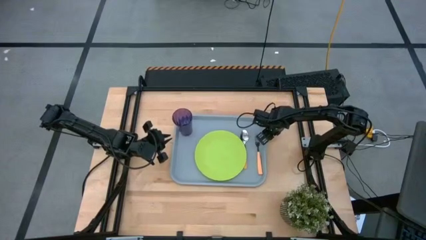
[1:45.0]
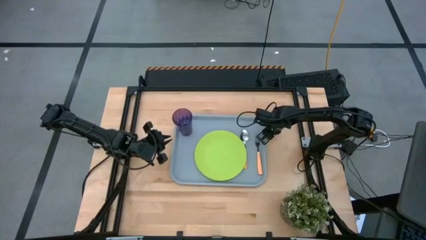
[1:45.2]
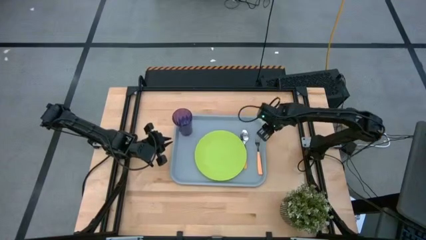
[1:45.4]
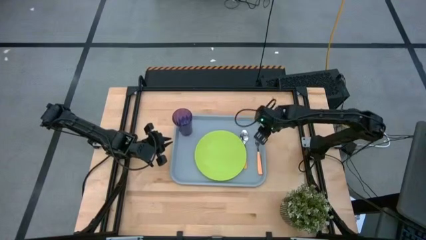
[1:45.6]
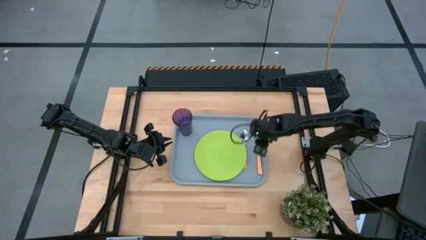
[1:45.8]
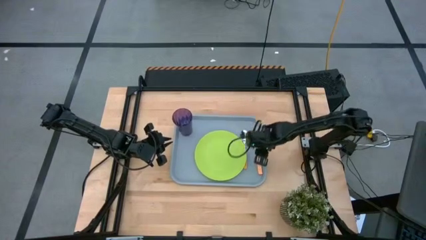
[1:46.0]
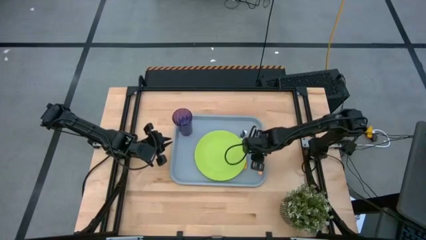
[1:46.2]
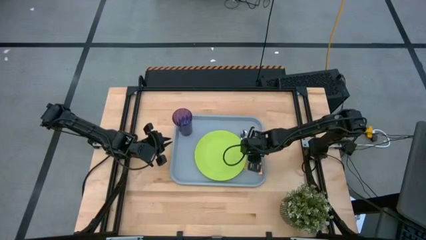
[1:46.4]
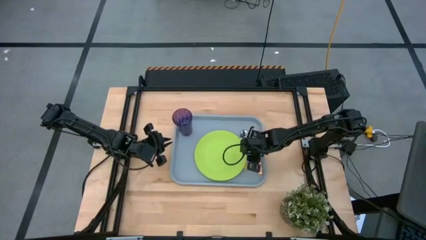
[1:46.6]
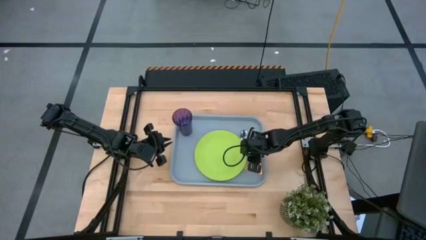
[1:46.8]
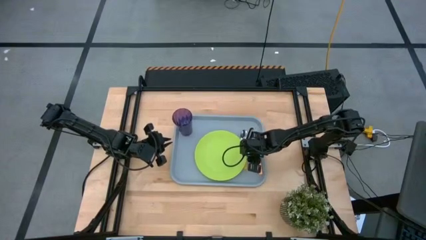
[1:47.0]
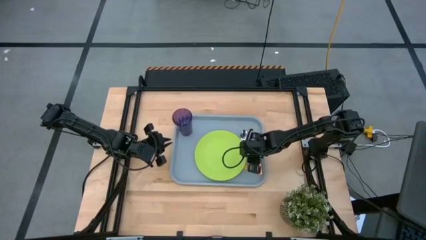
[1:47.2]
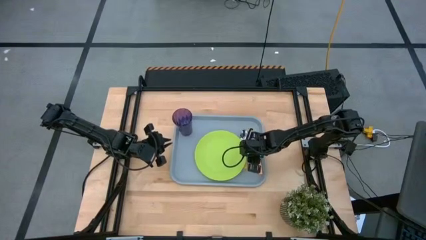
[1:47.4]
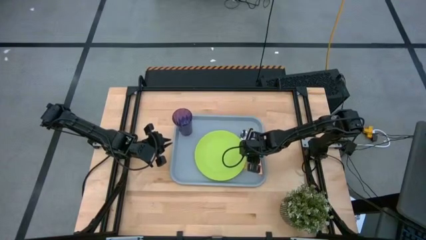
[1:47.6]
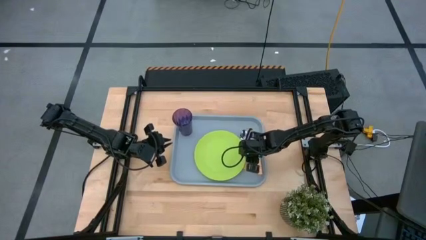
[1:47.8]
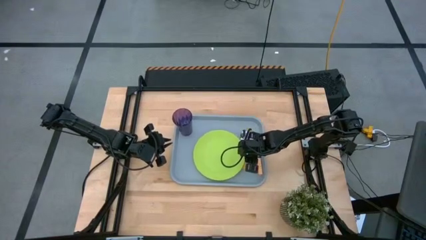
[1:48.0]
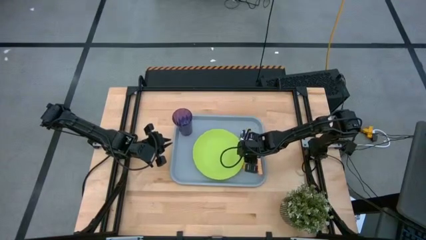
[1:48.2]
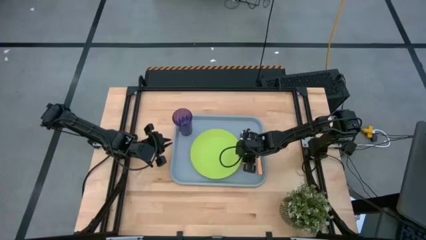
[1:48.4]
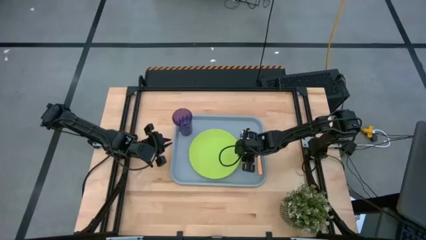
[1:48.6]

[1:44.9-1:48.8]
Task: Pick and place plate/cup/fork/spoon on tray
Adjust the green plate on the gray serving tray

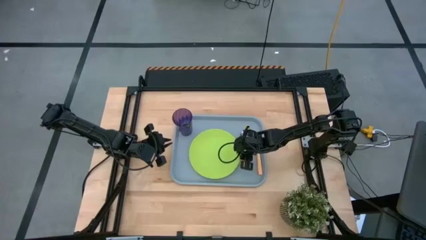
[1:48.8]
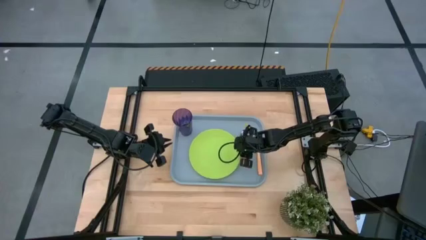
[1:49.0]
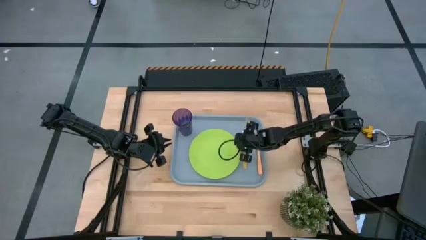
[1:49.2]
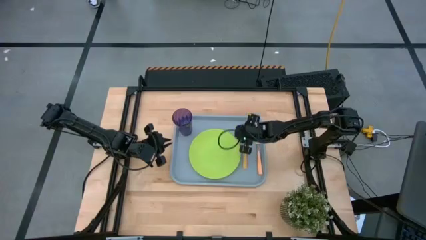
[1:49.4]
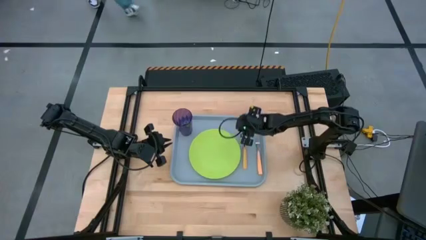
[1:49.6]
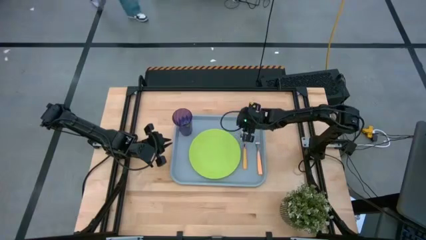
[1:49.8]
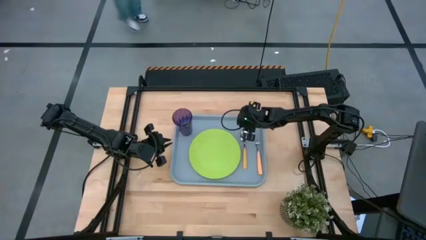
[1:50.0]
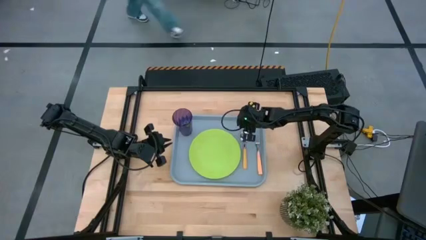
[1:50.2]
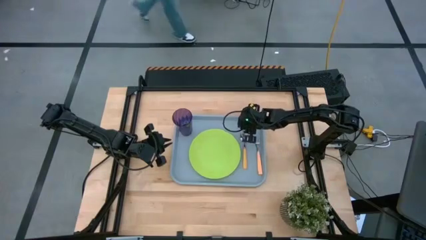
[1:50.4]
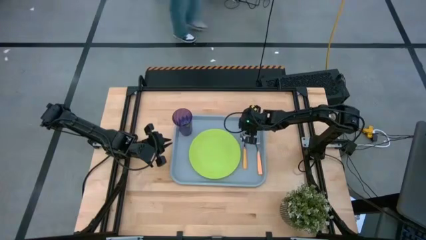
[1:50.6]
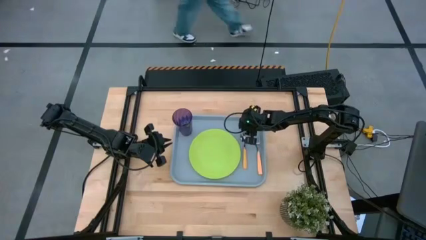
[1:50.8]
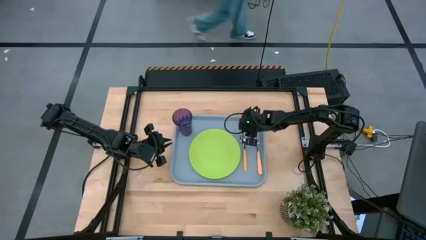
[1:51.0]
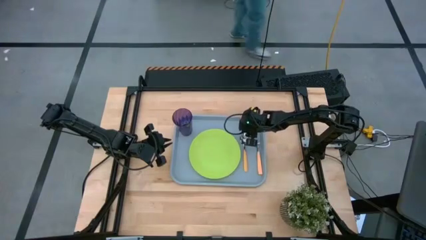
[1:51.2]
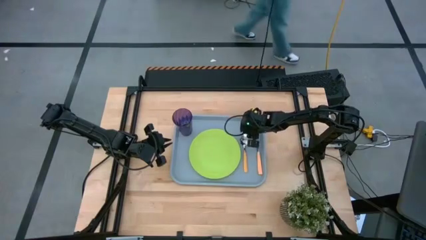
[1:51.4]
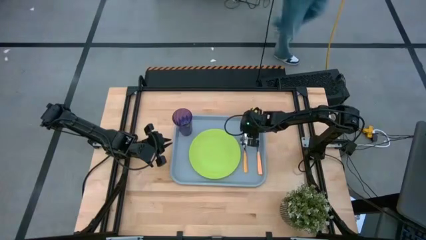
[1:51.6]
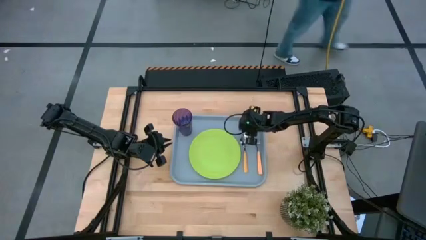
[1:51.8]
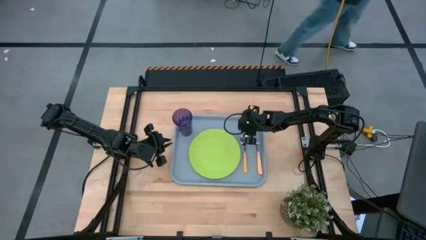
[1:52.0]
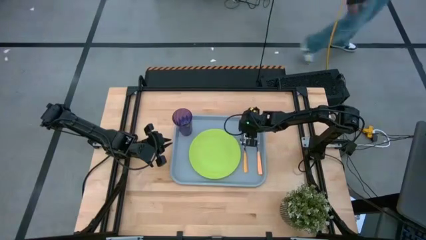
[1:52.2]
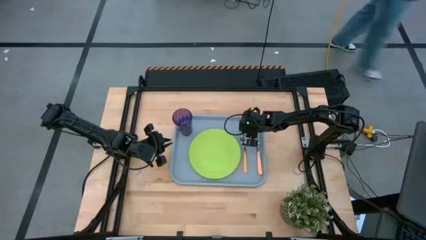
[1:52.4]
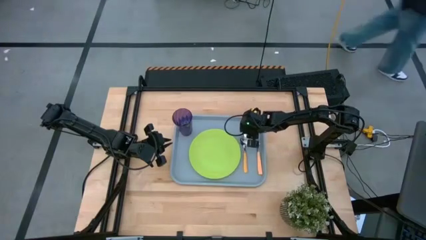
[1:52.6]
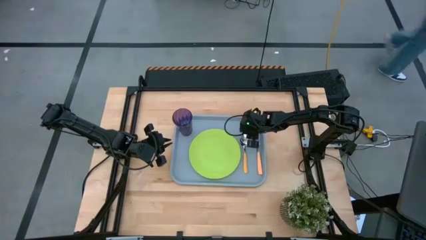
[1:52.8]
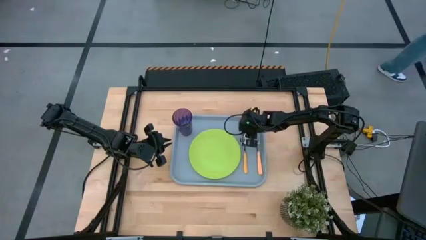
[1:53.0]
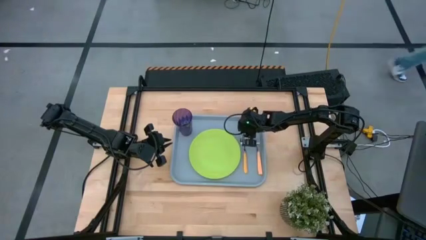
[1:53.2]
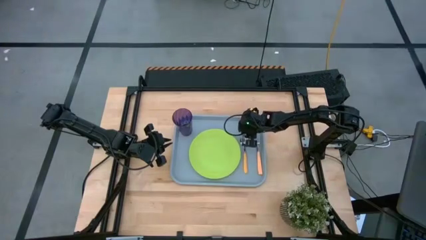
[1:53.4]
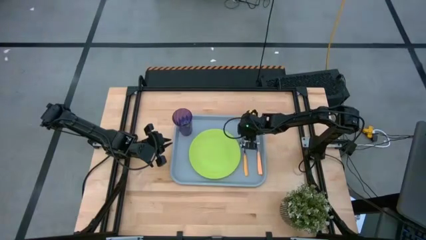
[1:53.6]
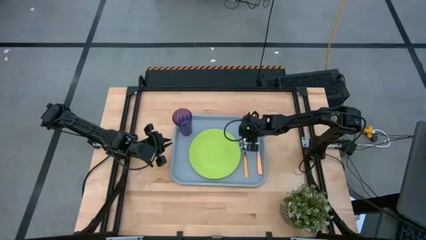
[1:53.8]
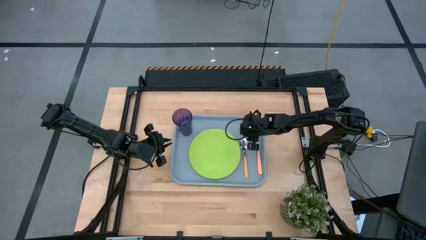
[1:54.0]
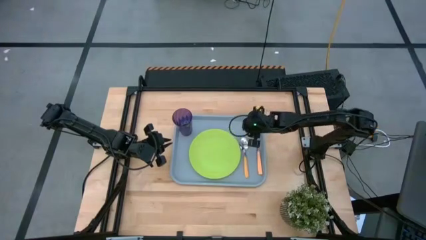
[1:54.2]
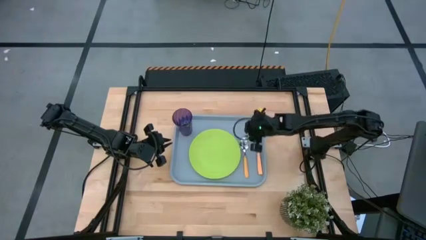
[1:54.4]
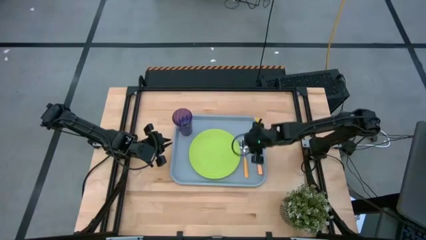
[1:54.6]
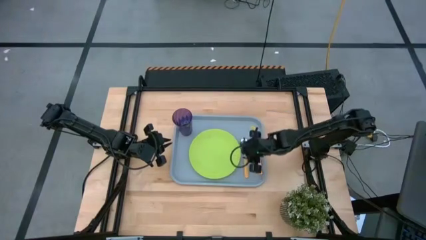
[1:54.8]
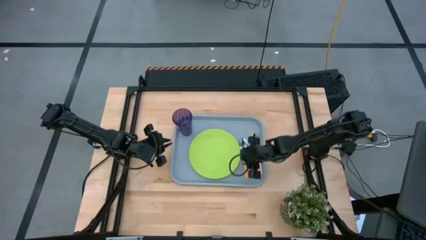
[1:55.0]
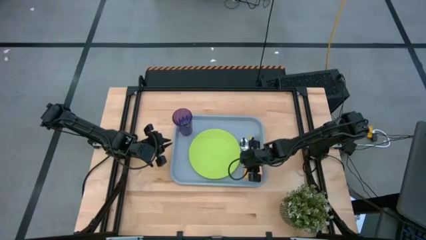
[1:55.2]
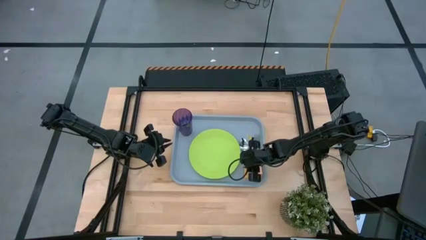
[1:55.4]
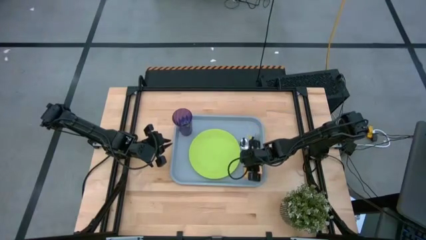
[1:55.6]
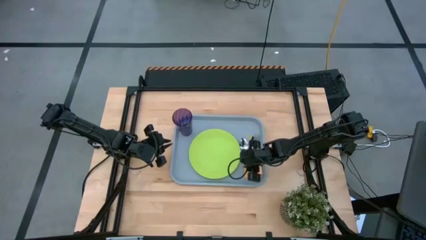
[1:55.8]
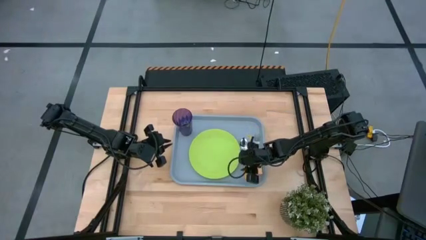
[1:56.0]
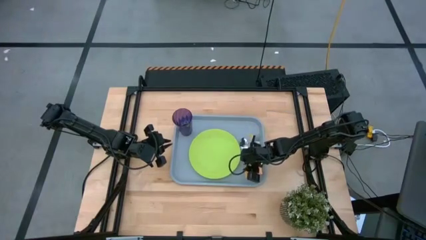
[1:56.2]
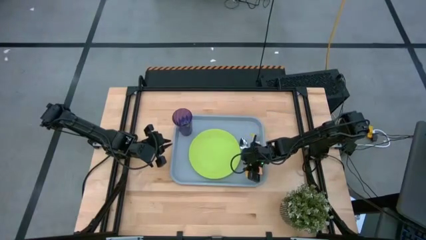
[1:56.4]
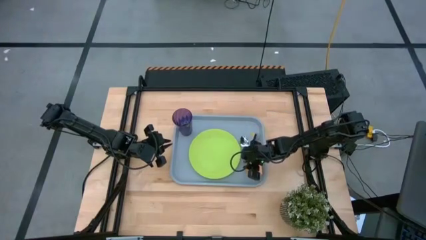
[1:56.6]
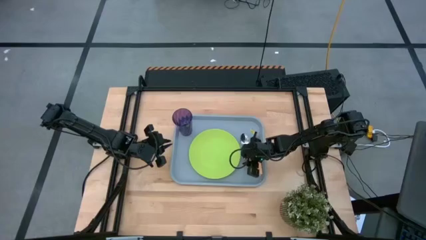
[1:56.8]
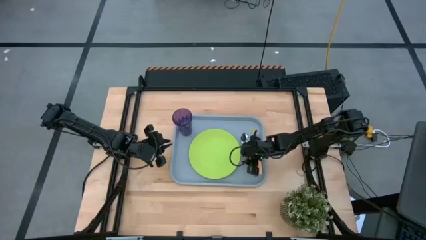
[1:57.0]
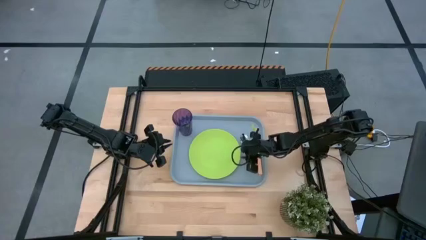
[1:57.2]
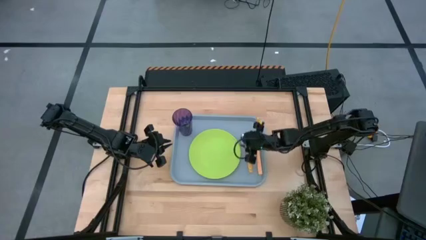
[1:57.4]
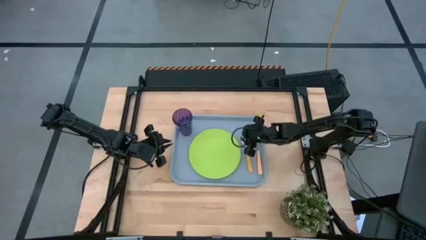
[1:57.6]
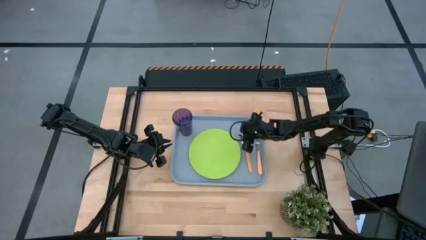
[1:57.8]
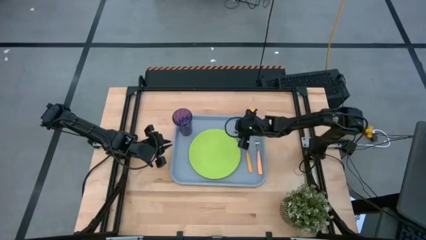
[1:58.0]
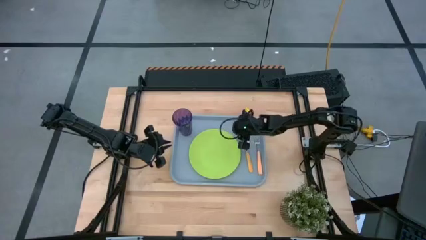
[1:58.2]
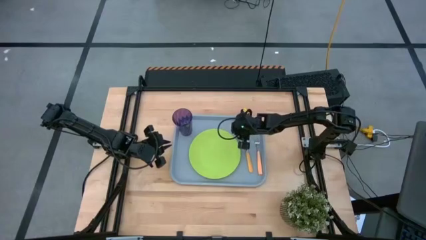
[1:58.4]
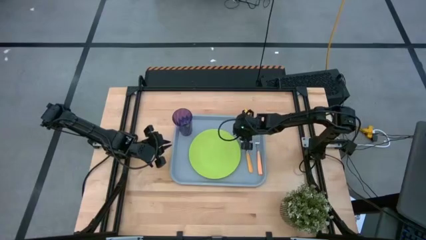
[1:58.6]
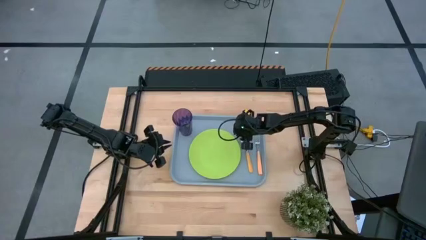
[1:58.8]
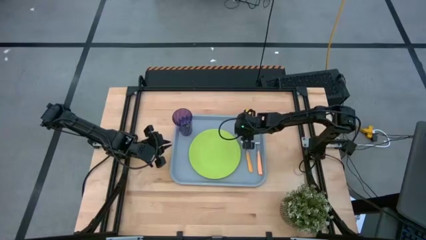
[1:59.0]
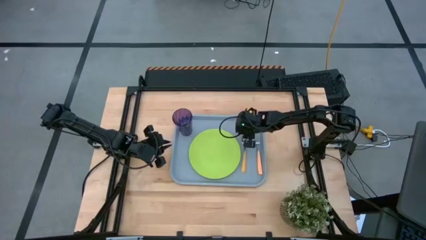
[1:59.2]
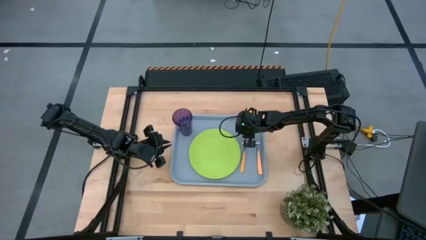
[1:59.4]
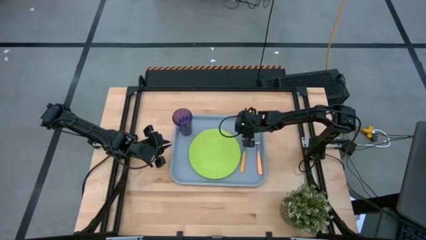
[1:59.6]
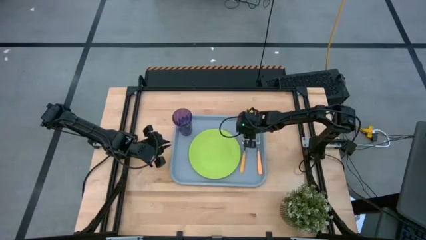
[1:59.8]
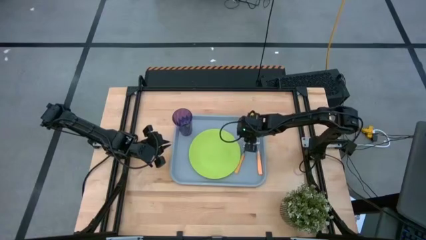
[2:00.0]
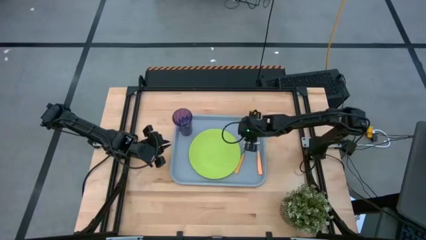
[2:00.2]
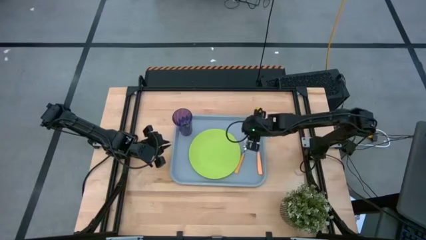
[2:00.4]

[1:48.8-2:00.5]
Adjust the yellow spoon on the gray serving tray
